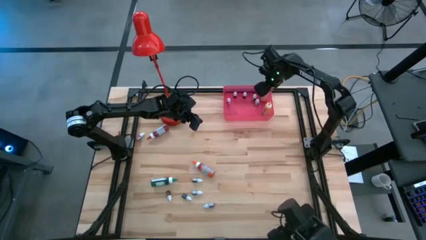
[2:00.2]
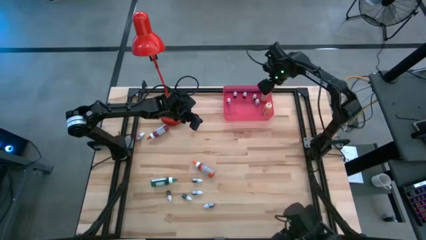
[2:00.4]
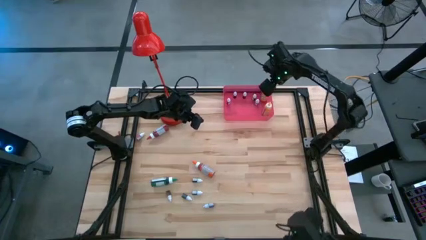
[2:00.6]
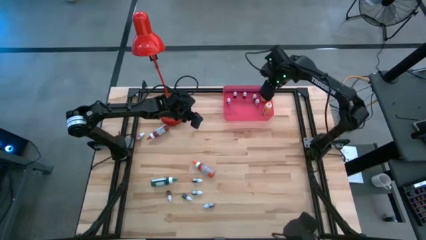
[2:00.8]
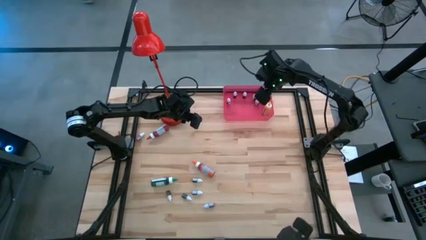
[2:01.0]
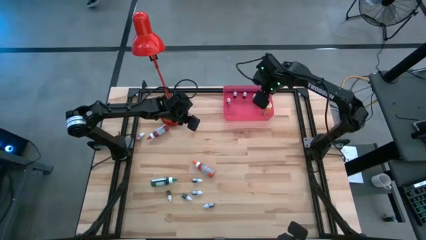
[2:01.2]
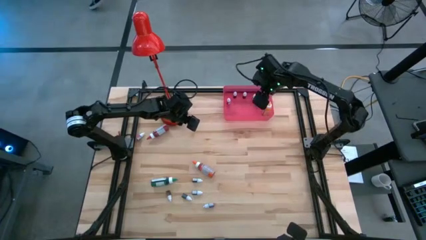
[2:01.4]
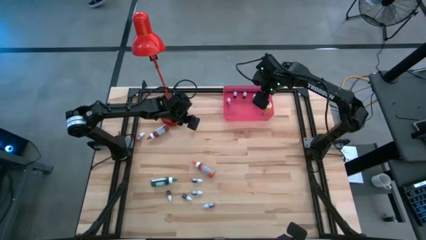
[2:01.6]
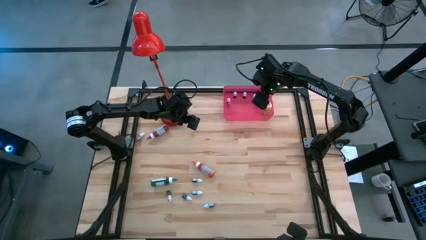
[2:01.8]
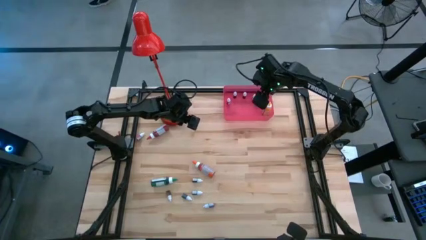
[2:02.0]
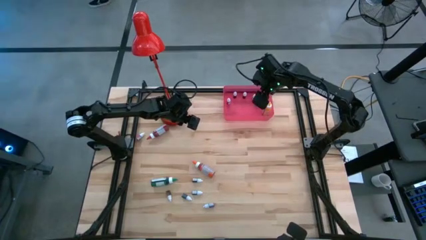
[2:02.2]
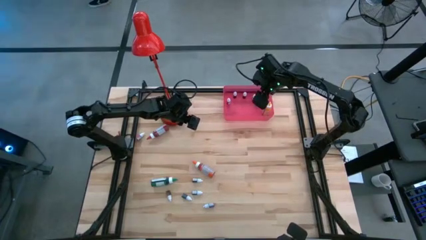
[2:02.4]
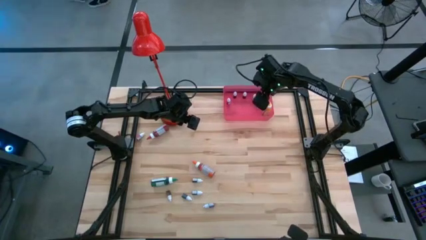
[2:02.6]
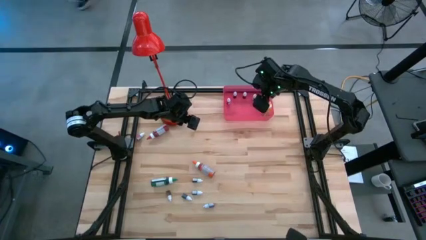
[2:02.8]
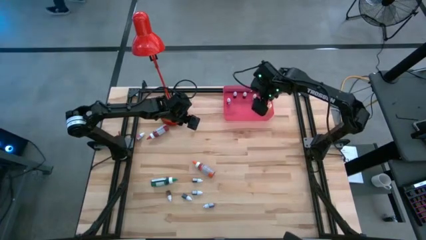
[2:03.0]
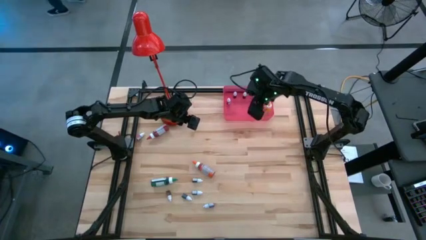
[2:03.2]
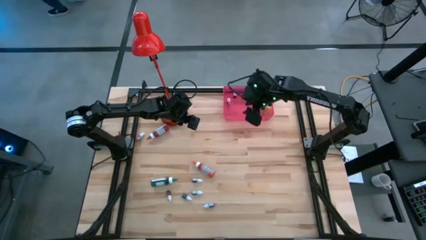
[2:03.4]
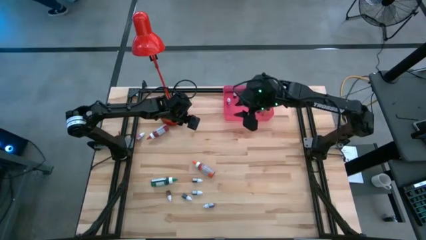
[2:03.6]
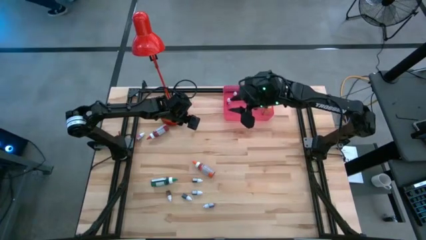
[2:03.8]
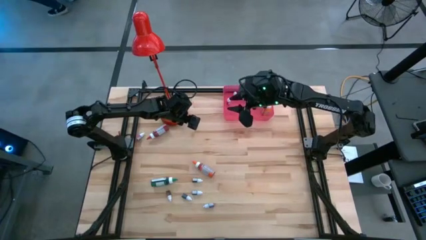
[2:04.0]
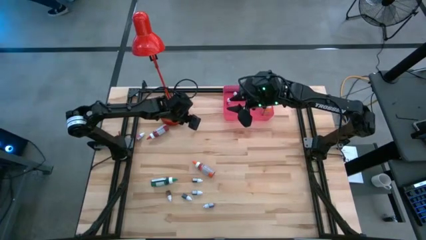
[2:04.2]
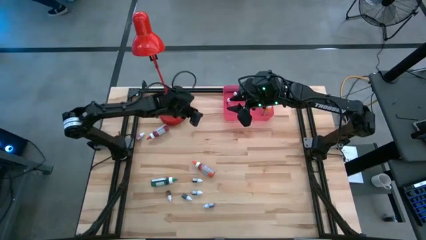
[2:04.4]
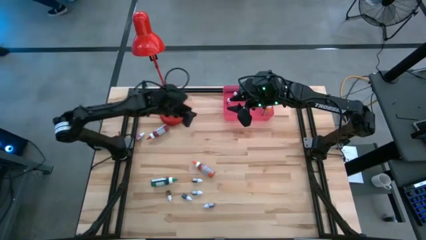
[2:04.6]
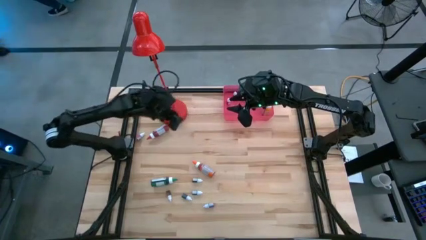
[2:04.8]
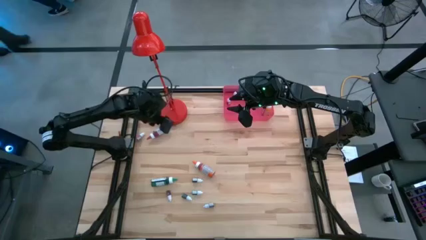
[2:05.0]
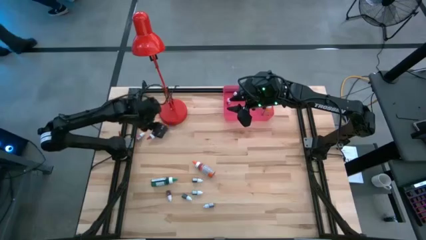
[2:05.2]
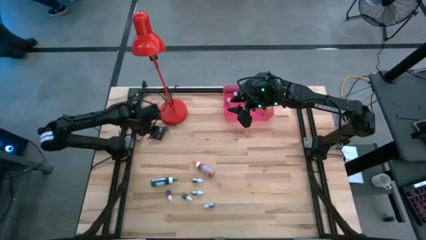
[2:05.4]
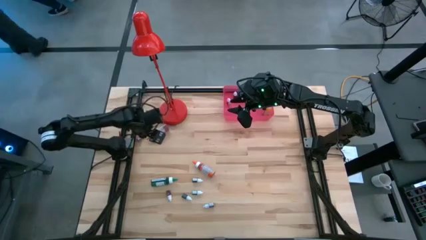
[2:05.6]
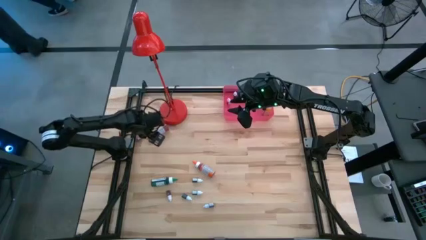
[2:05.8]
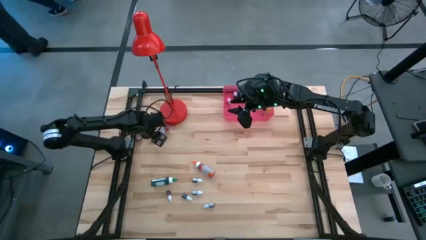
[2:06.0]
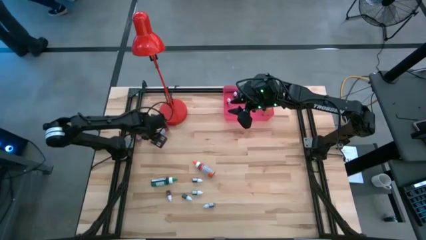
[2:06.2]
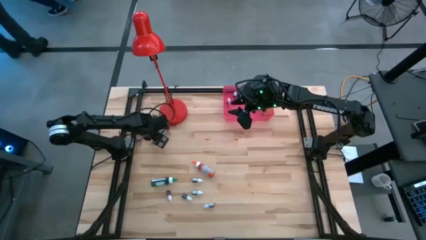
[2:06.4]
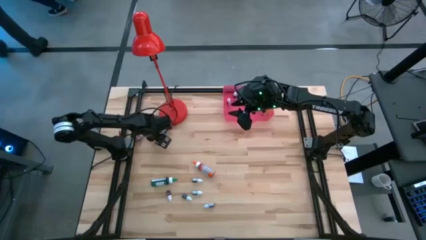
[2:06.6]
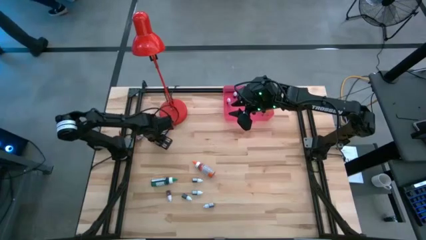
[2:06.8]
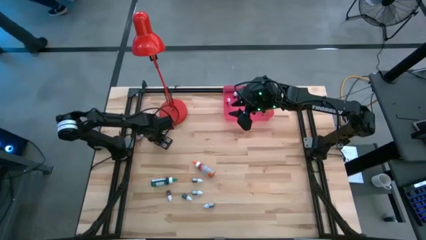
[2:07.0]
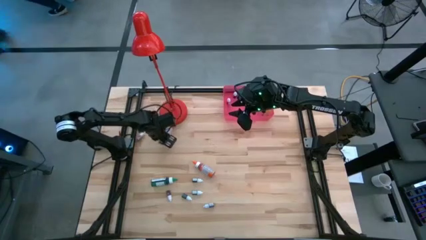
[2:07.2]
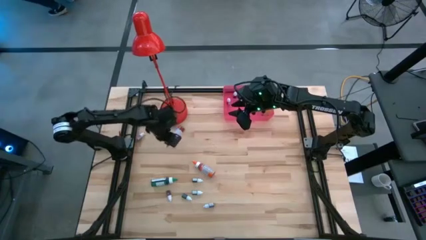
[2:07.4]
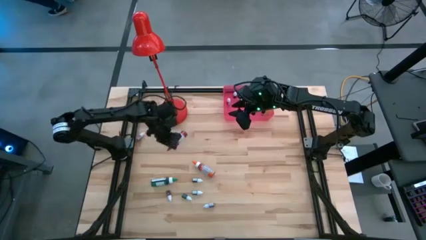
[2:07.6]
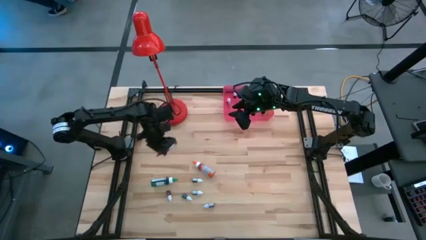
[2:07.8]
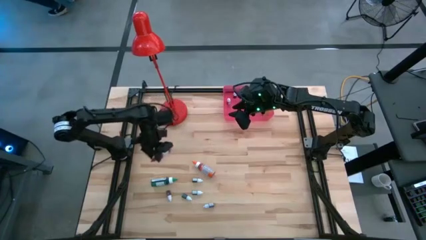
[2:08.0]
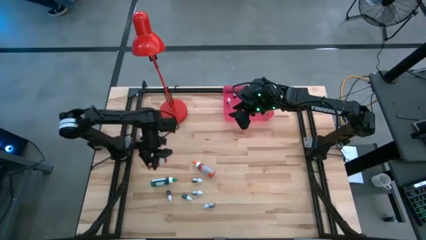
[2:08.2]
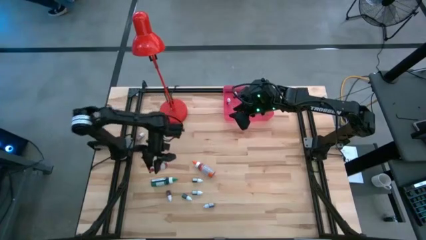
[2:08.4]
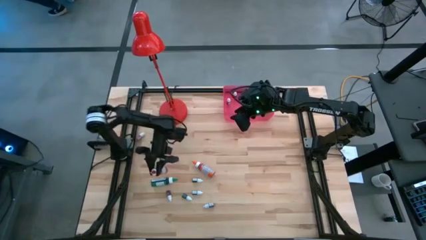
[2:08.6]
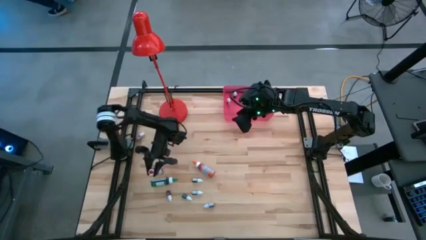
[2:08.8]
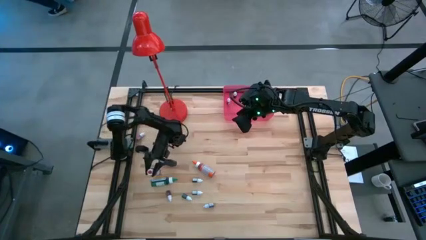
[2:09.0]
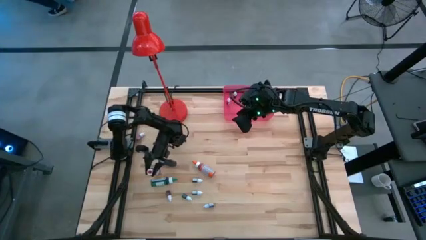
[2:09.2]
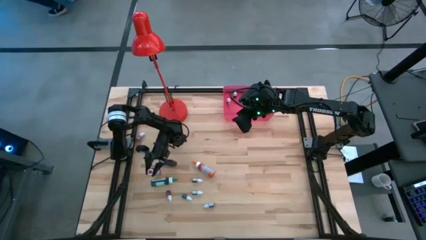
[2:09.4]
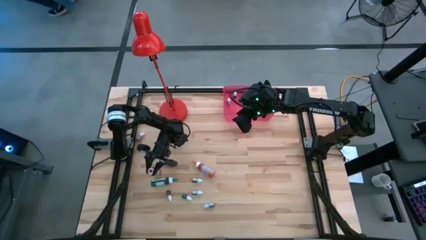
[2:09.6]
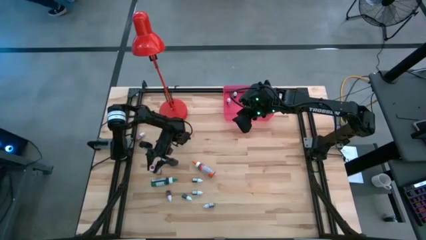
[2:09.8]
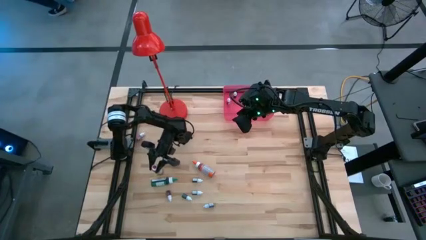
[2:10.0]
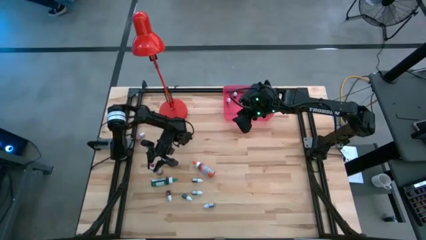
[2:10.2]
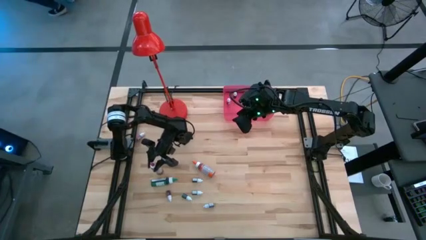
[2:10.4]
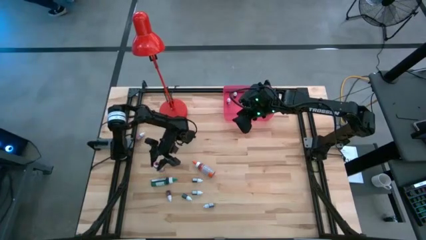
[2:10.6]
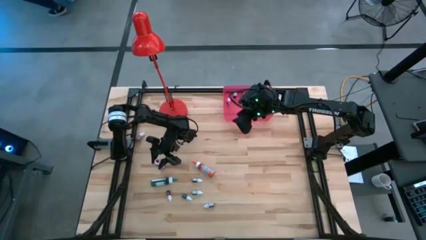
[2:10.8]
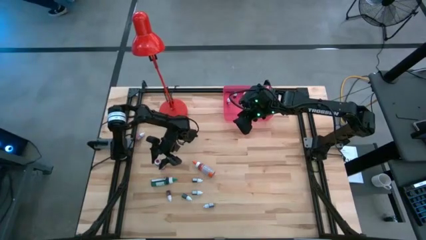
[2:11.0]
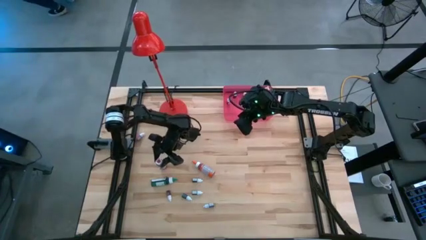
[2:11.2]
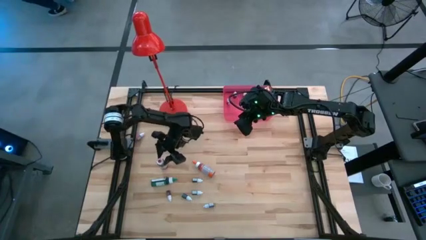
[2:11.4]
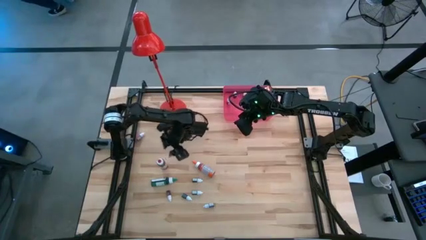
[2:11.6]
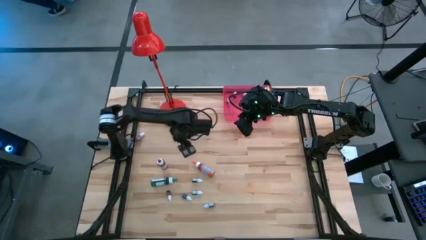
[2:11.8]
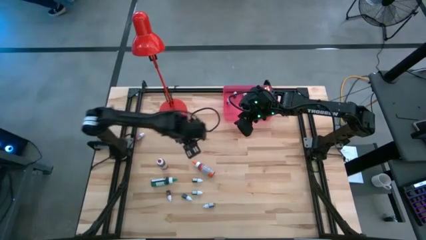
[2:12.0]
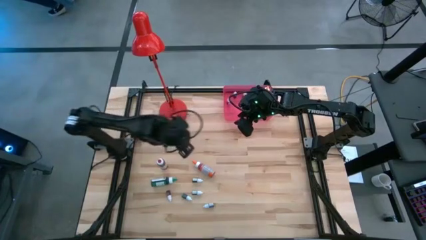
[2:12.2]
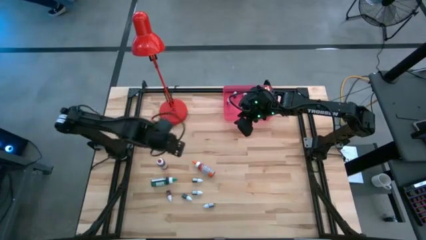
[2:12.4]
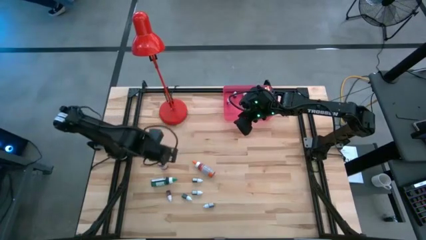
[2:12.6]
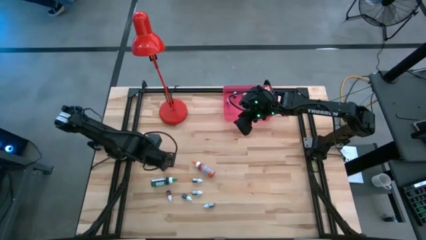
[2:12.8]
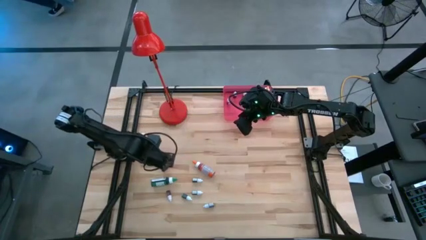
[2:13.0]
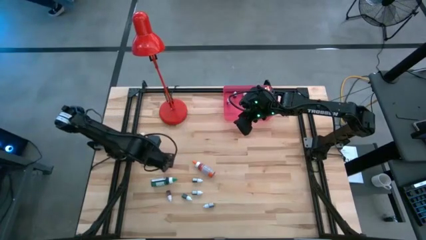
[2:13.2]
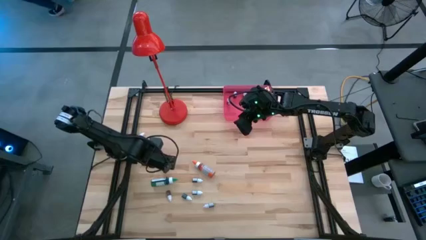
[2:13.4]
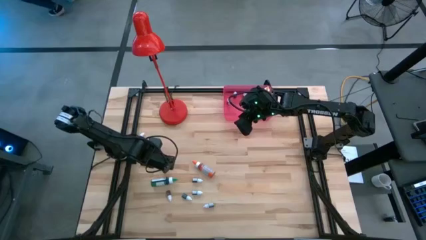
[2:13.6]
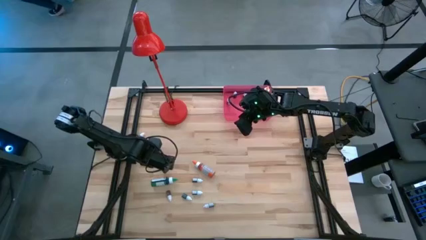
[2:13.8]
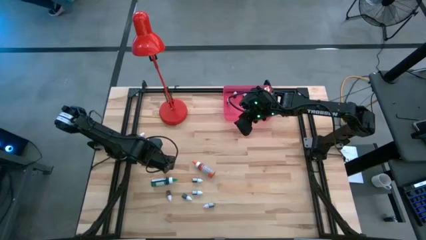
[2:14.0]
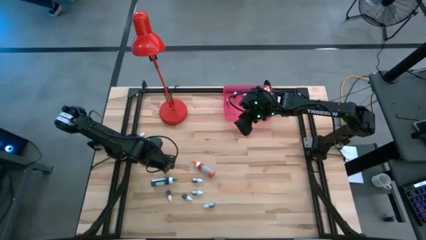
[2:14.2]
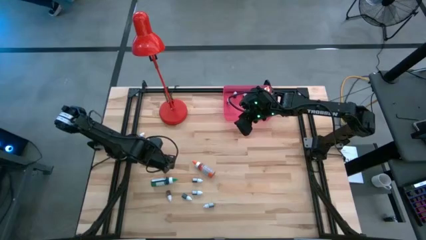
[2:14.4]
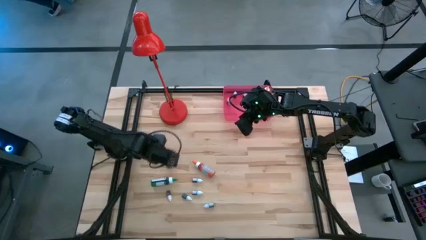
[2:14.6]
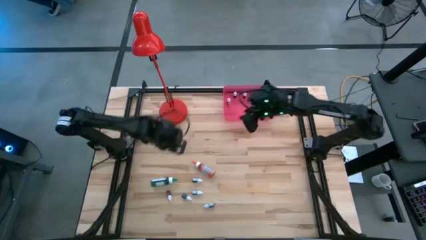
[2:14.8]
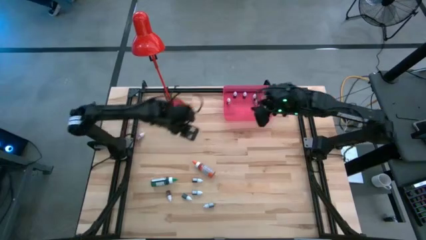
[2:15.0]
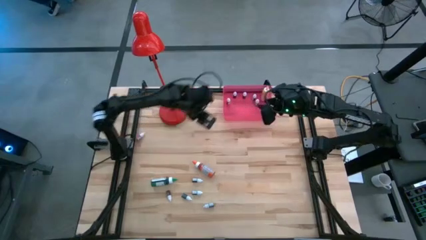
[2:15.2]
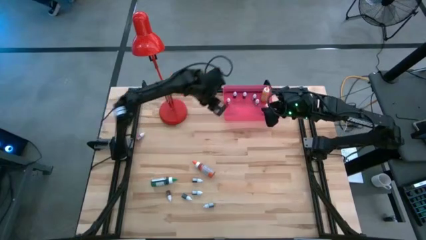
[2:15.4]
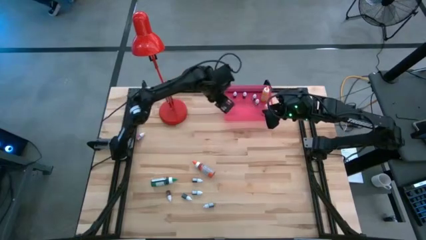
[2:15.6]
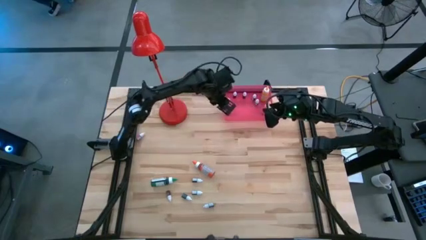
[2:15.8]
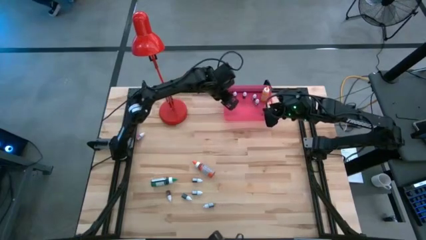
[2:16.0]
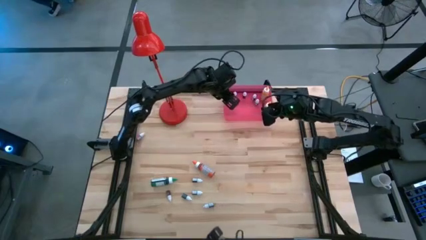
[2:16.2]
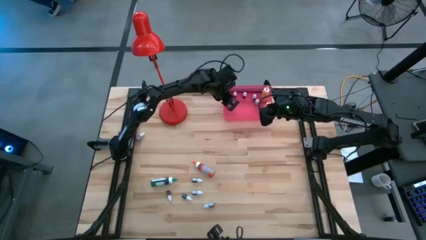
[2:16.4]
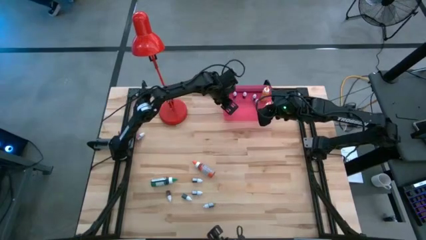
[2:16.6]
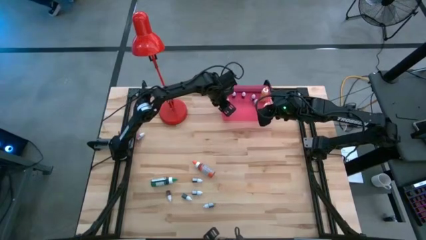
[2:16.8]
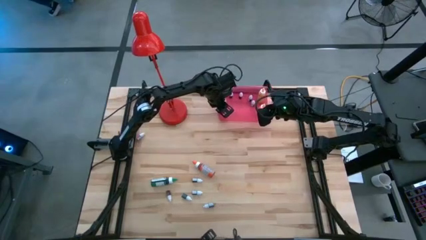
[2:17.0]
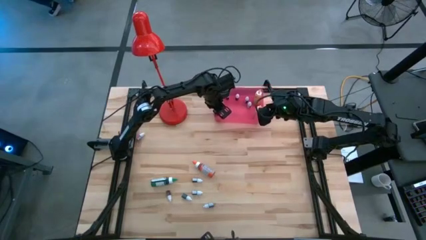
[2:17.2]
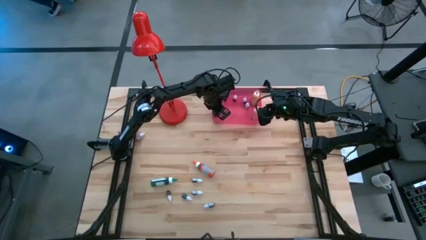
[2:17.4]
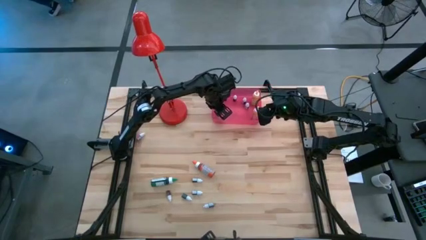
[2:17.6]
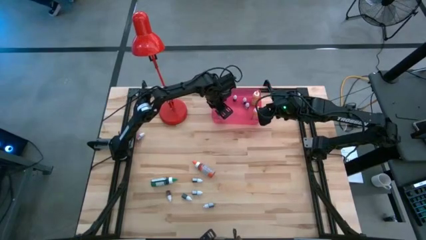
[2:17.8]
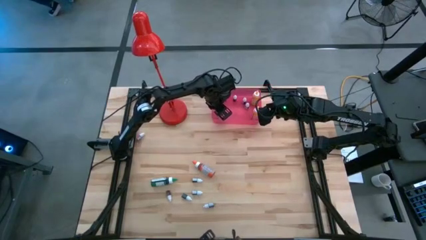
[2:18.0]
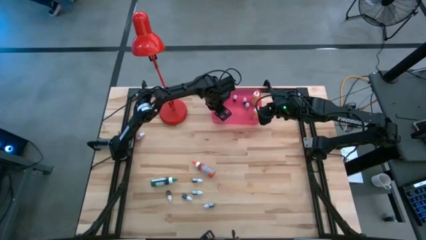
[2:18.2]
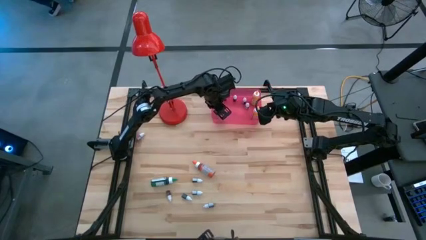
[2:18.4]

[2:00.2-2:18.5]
Task: Pick & Place food coloring
Put the large red food coloring bottle into the red bin
